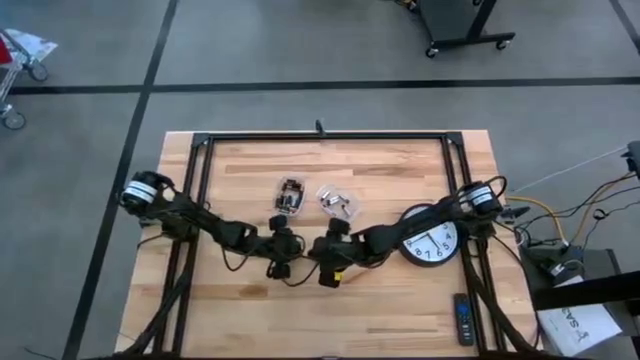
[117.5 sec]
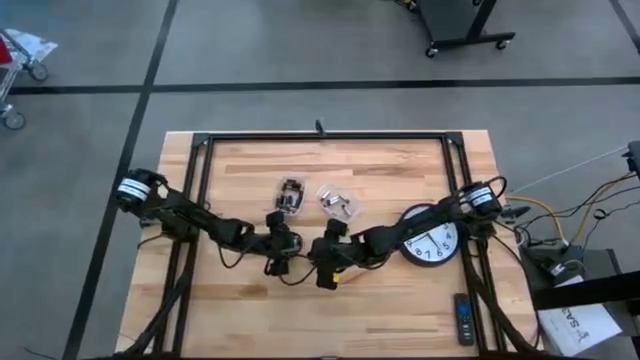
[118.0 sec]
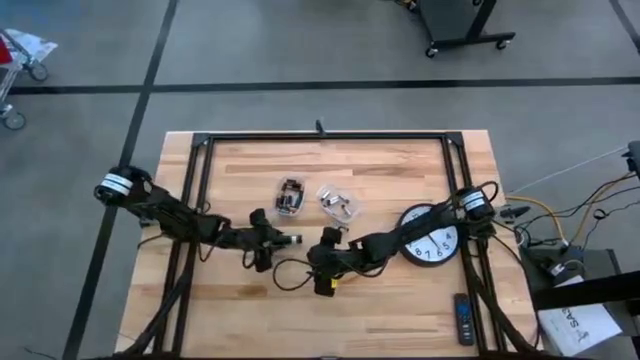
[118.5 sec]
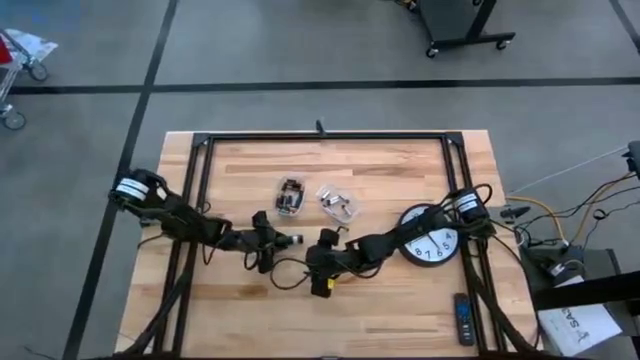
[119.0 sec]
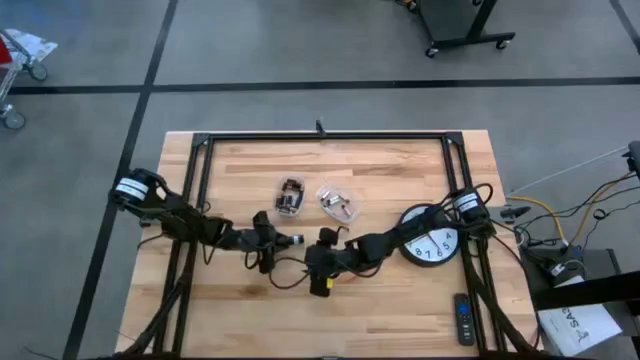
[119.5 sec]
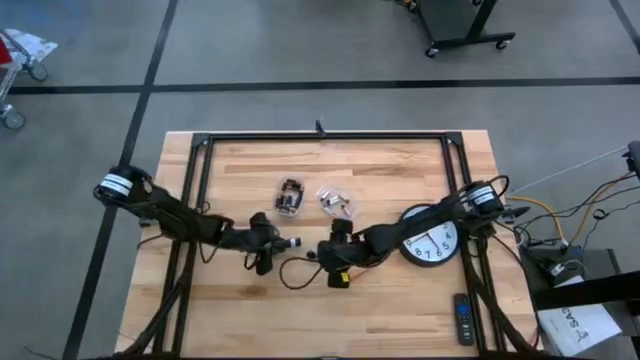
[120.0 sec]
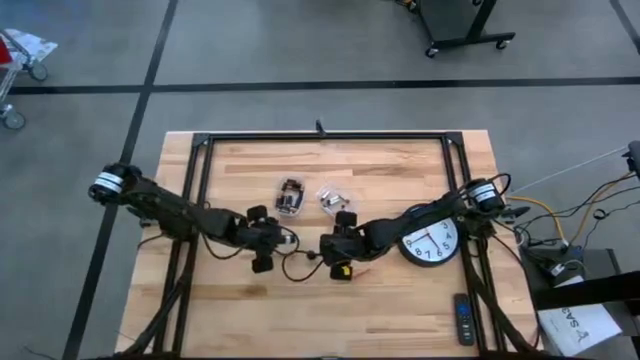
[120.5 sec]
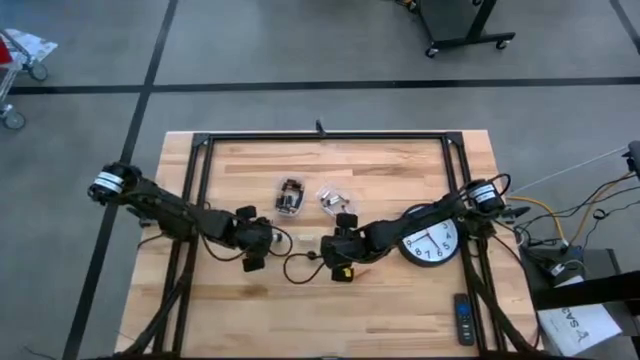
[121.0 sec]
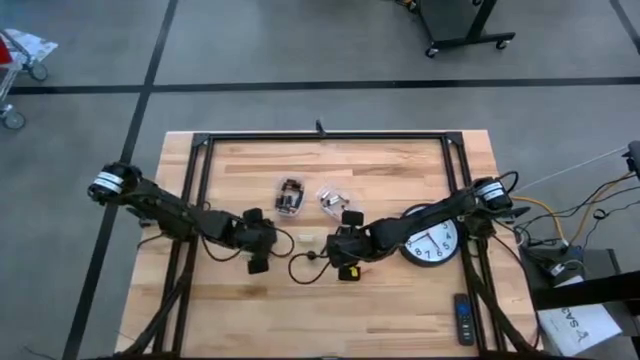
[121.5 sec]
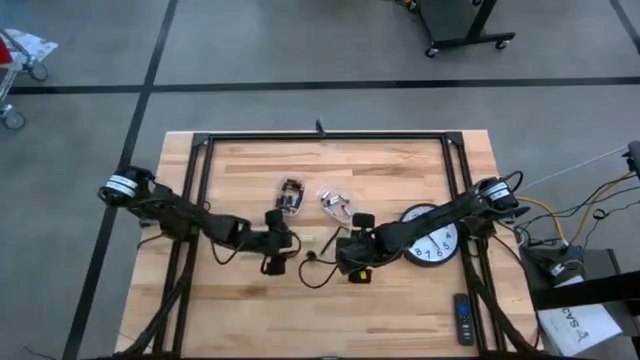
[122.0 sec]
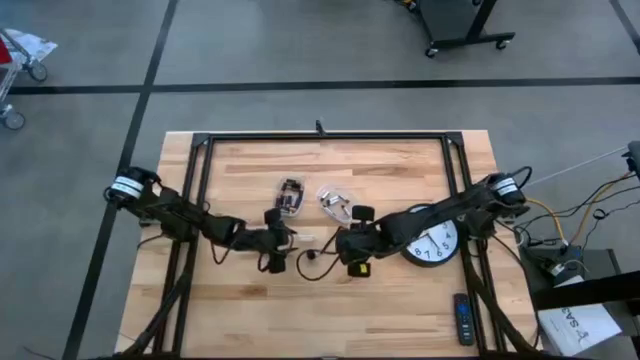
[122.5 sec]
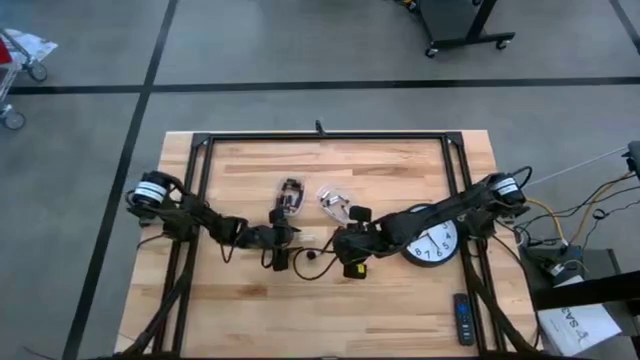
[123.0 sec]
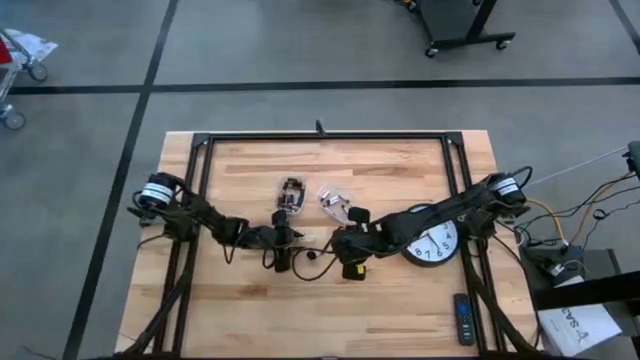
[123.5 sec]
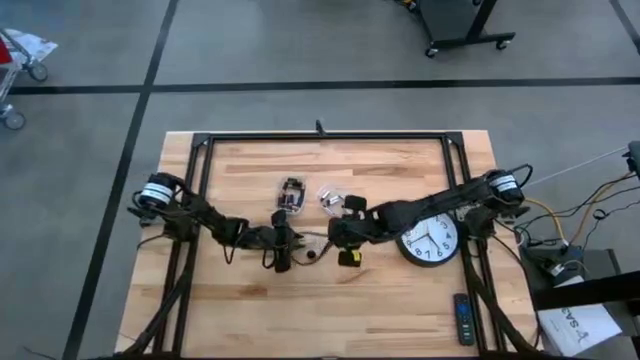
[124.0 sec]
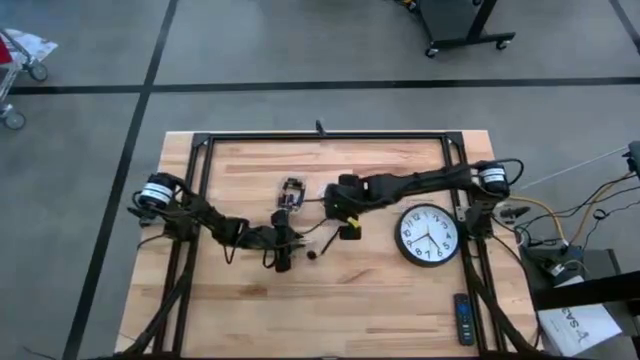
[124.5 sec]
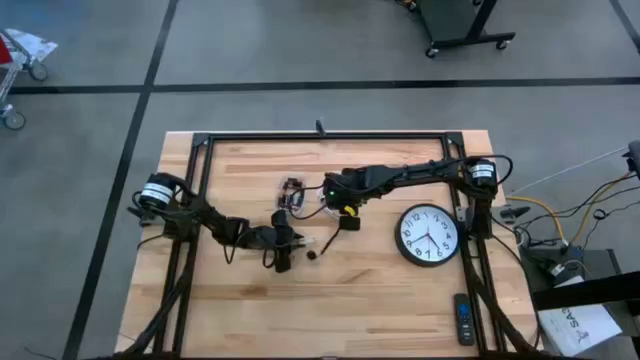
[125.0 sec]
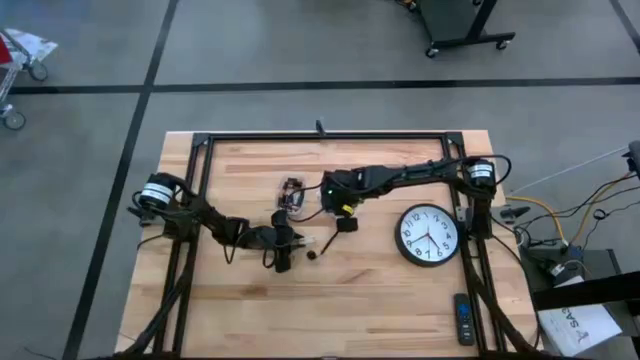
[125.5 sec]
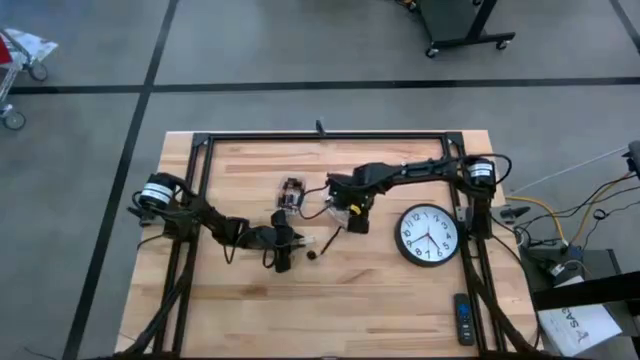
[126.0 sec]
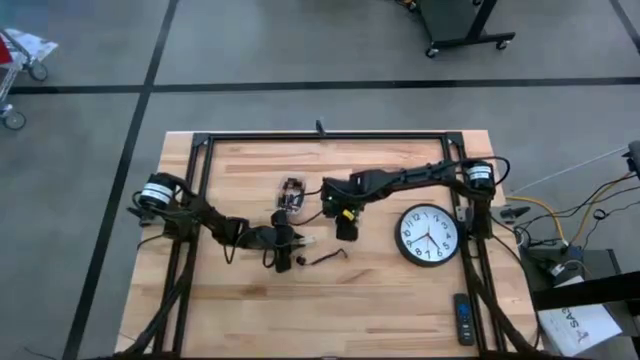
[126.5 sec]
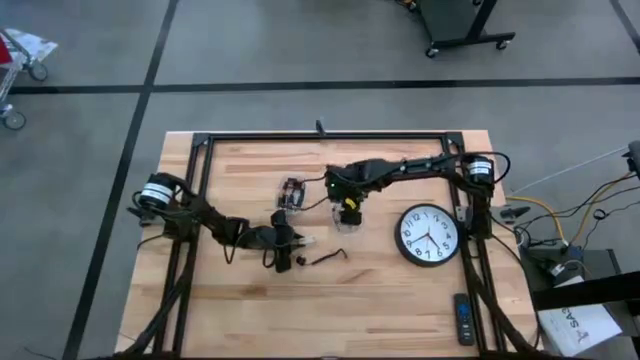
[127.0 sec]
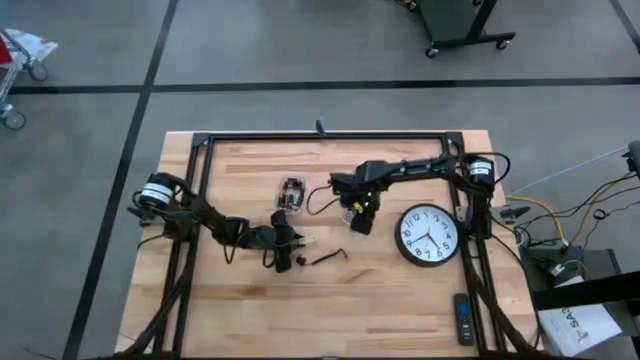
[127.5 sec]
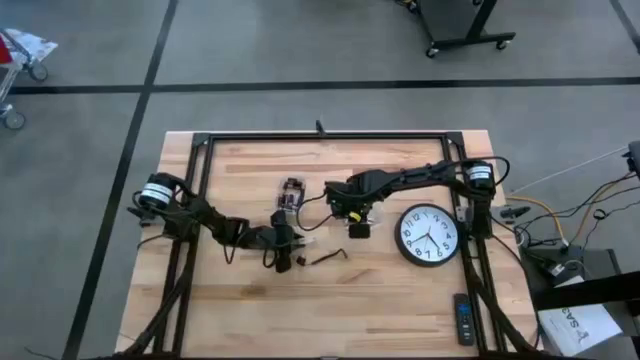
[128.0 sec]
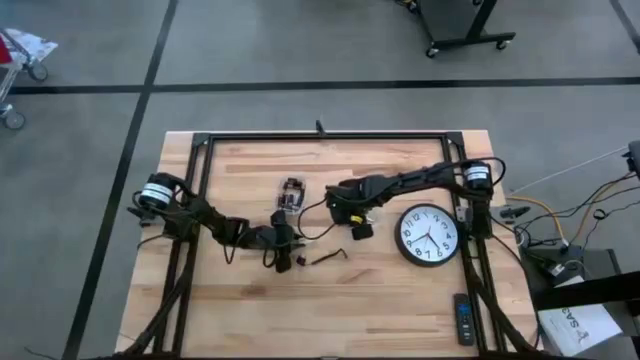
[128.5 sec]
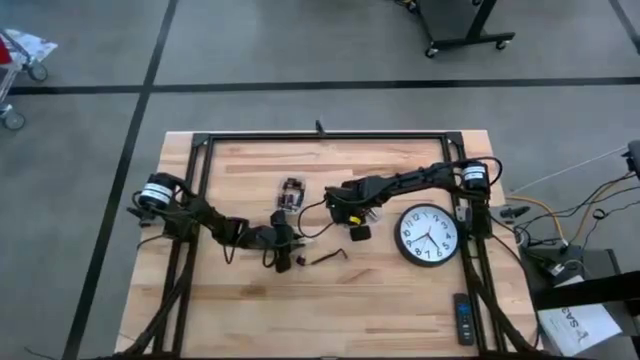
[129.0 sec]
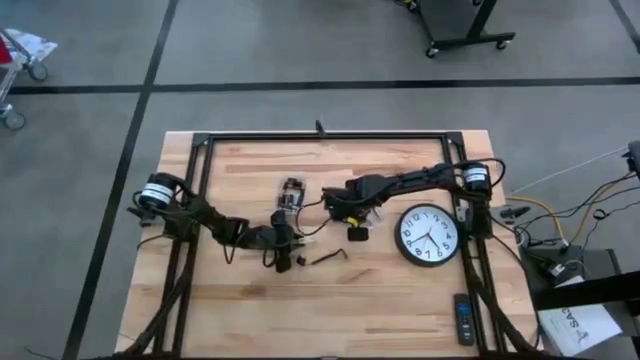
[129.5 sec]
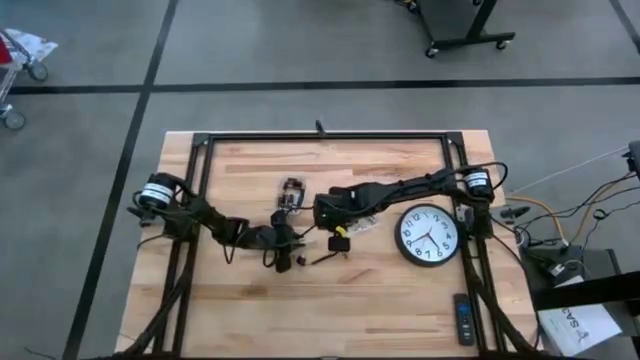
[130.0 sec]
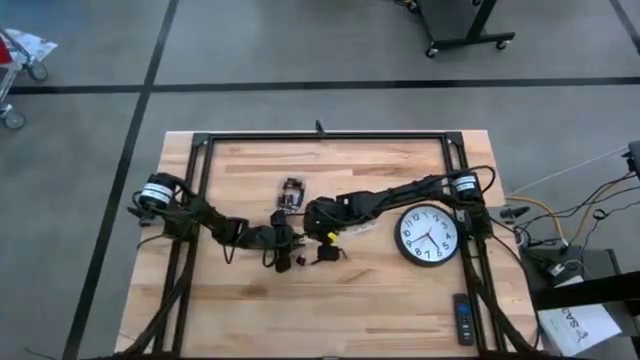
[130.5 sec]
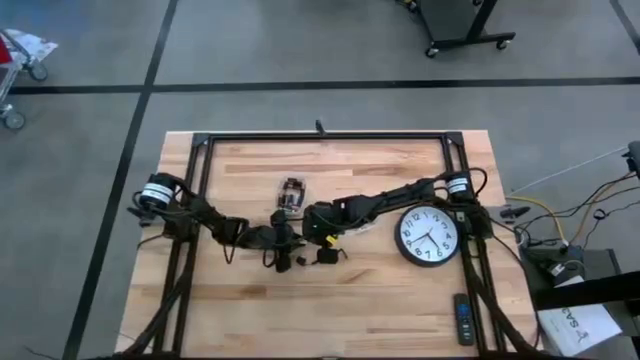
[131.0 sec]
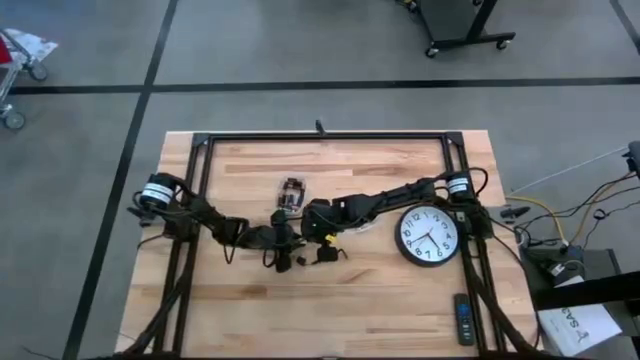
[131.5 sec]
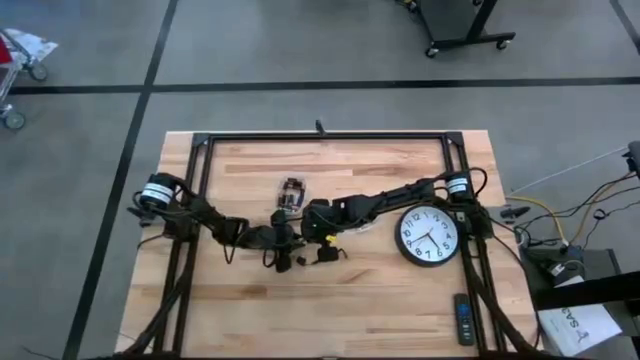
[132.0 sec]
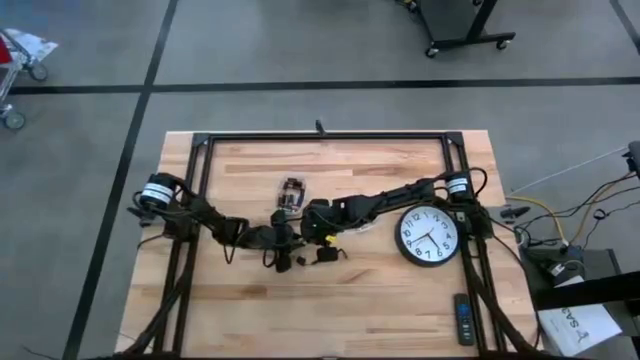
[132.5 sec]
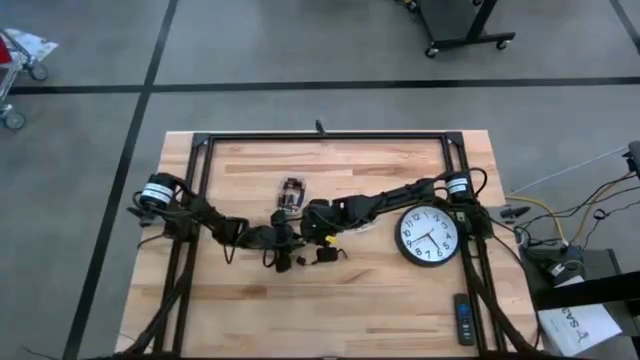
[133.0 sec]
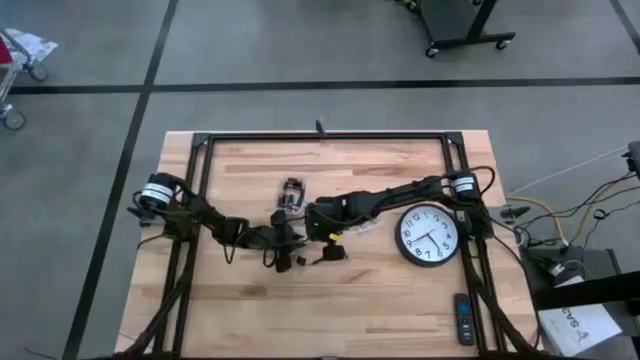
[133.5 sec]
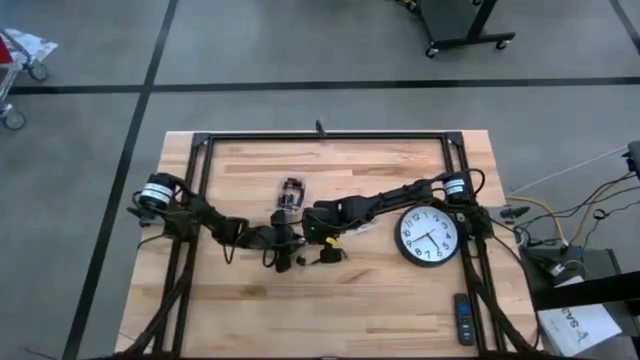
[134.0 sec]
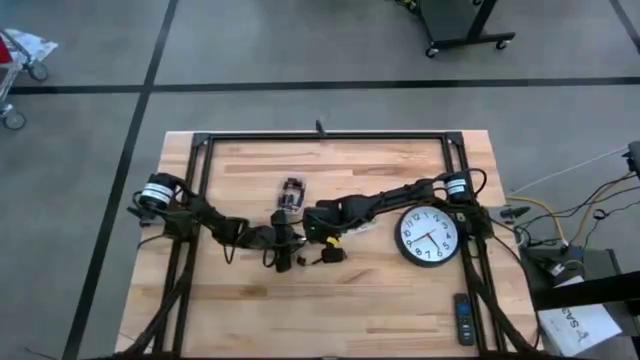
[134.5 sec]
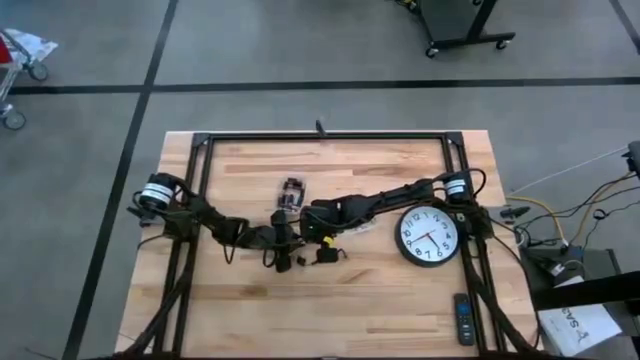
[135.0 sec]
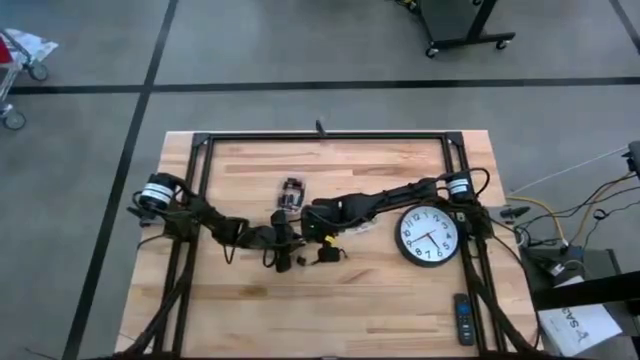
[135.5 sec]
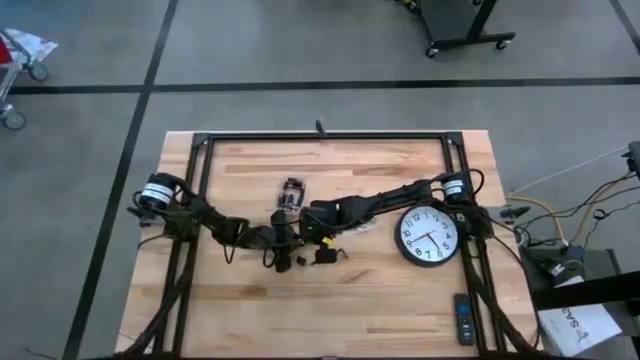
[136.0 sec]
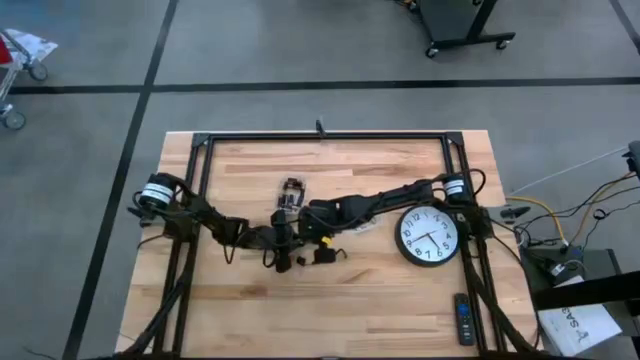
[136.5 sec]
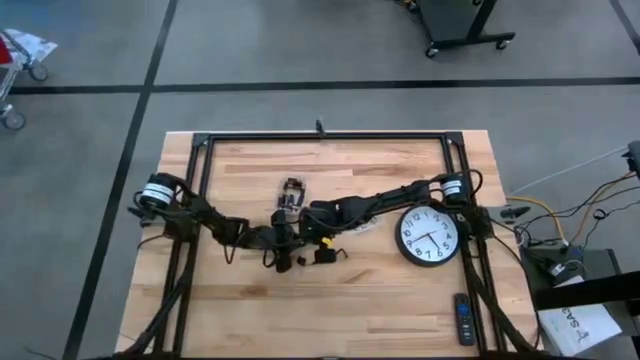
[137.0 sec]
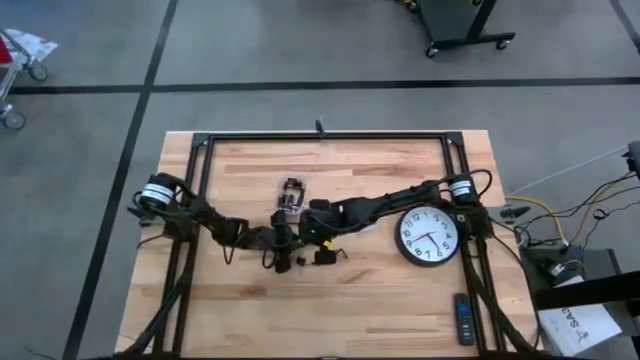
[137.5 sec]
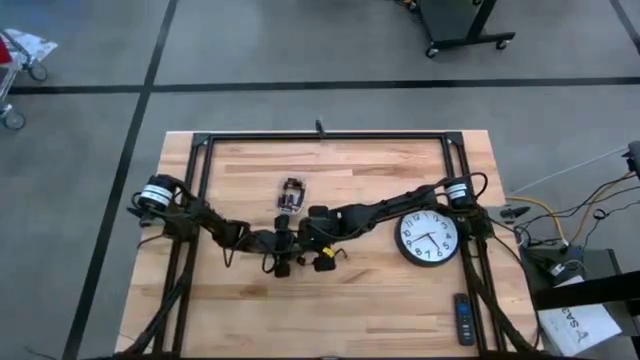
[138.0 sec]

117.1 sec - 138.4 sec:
Task: Insert battery
Insert the silver battery into the flashlight's battery compartment
